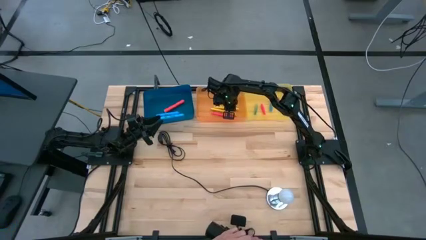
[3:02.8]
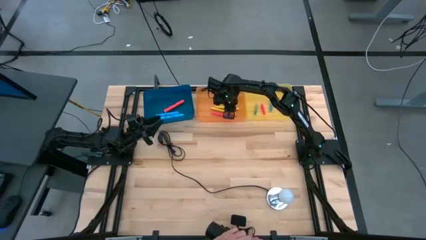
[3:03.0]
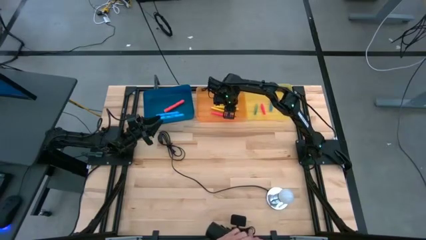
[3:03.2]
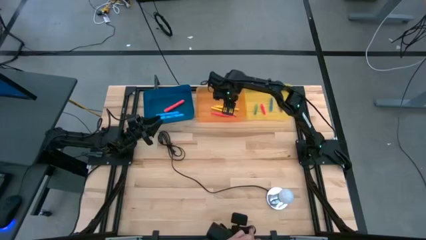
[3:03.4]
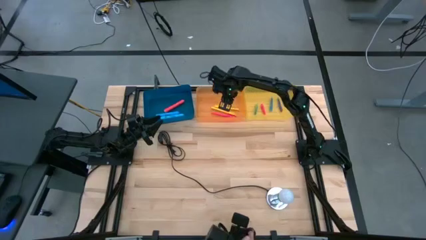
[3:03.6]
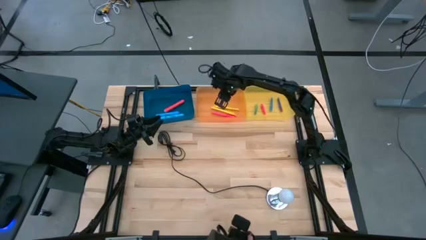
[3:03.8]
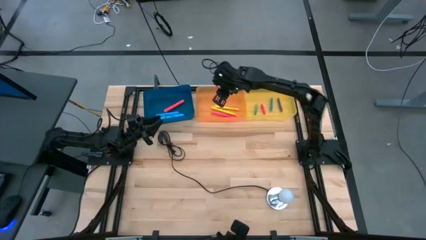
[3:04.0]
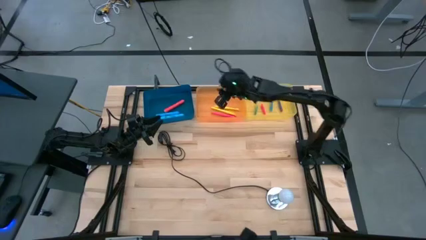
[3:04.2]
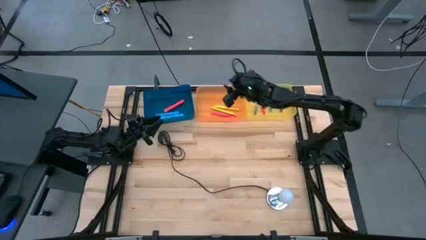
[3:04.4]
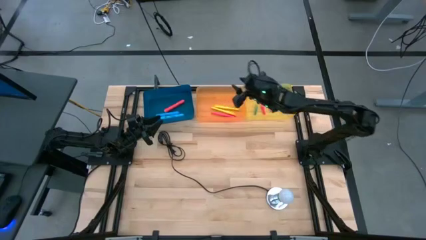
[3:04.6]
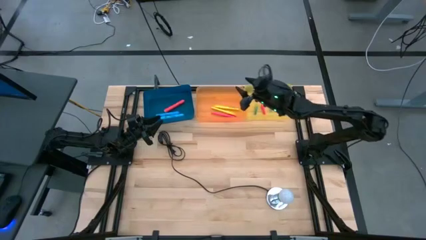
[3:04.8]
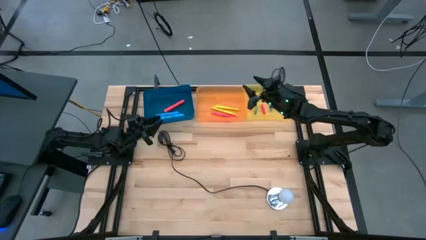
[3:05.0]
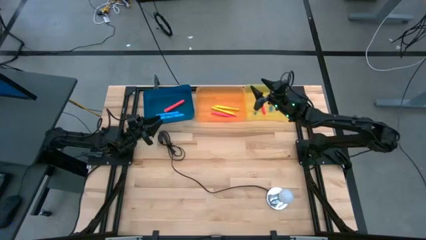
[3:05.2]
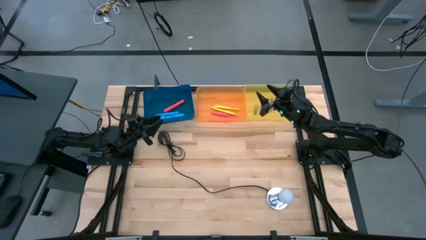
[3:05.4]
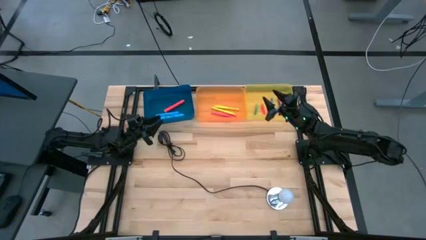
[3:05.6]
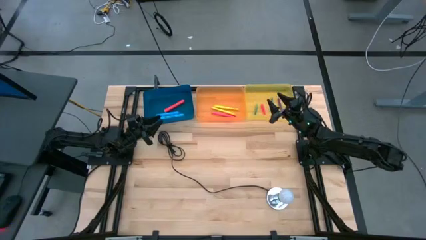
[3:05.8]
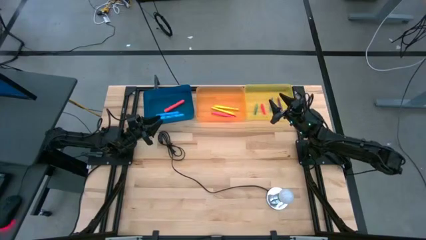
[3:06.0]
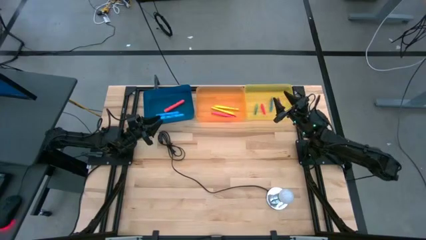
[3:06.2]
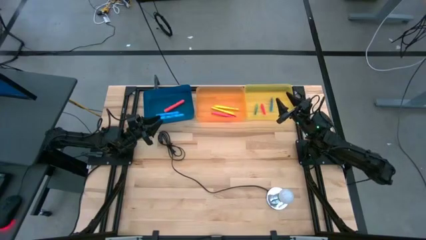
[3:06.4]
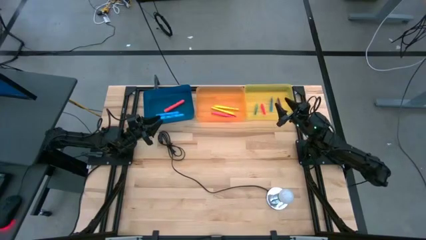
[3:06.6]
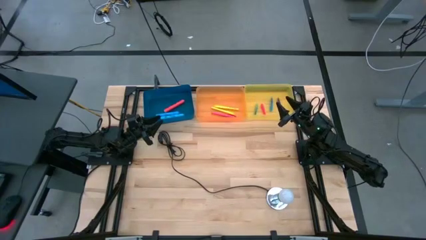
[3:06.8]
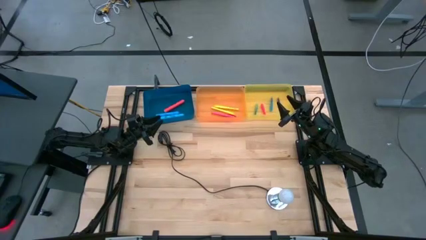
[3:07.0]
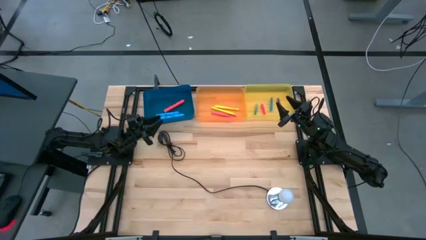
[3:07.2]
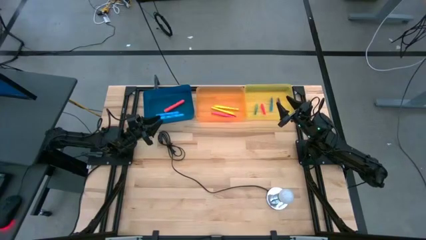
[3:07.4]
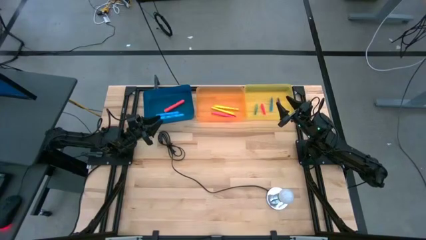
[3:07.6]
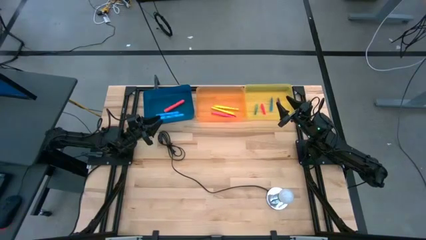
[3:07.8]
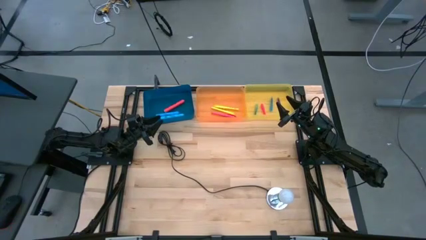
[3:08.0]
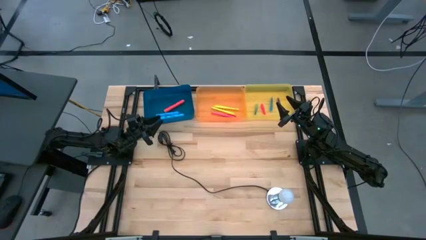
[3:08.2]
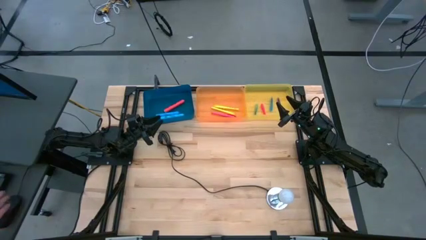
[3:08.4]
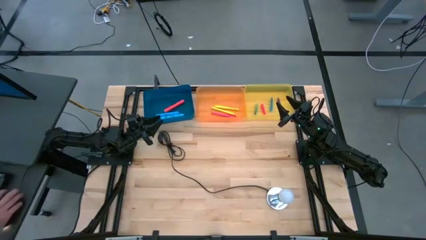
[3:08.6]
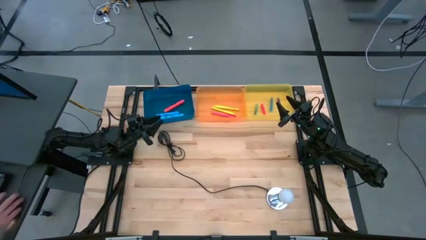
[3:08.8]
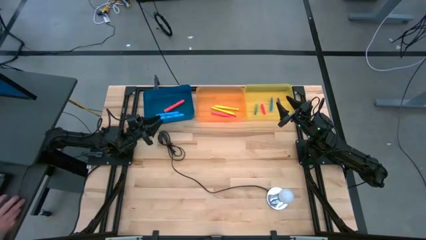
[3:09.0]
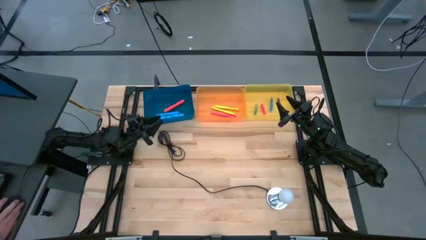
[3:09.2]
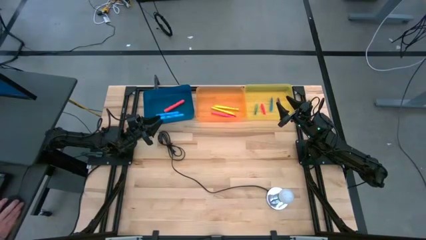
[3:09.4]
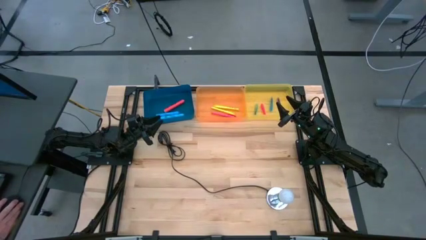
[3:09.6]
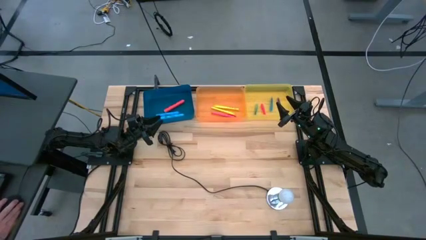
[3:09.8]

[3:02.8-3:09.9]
Task: Pick & Place Markers
Return to Home Position

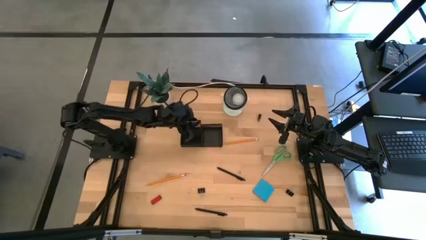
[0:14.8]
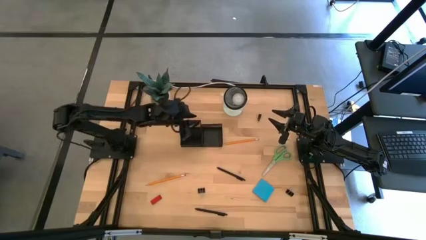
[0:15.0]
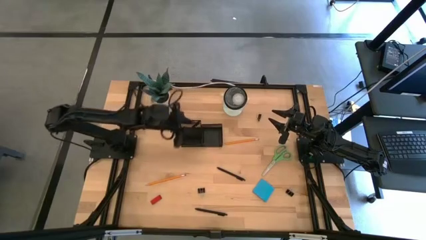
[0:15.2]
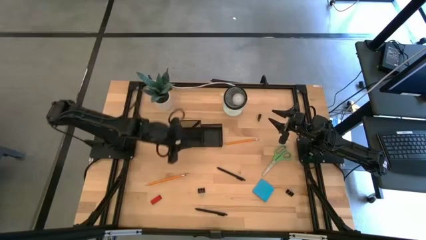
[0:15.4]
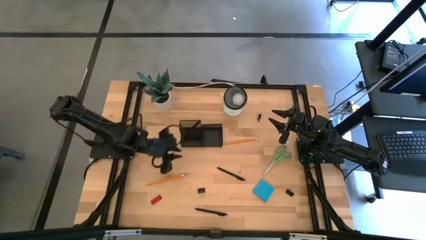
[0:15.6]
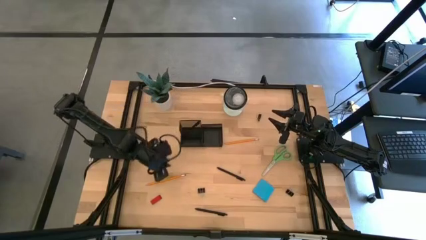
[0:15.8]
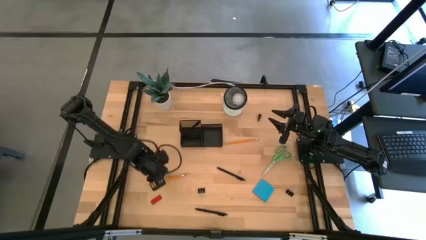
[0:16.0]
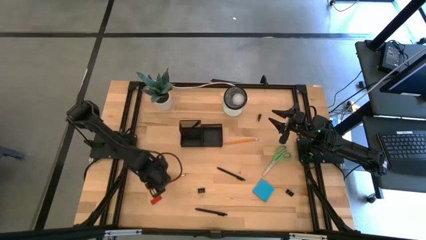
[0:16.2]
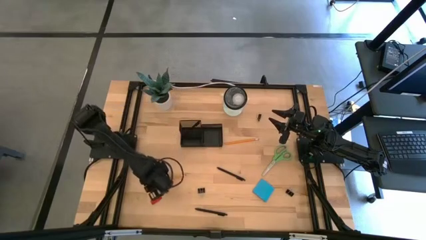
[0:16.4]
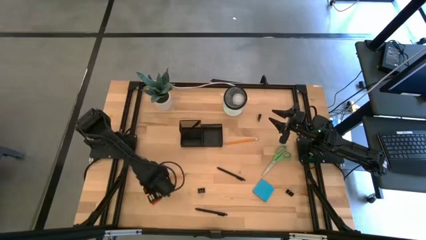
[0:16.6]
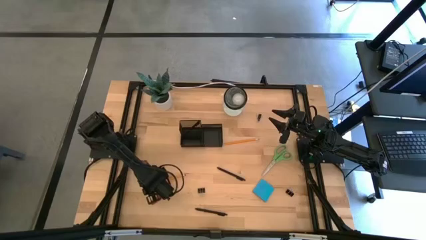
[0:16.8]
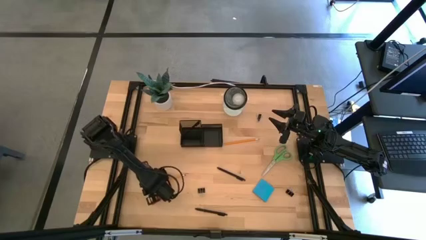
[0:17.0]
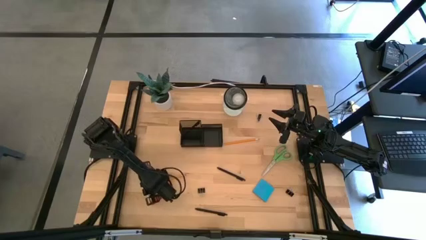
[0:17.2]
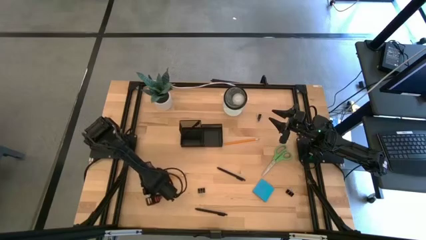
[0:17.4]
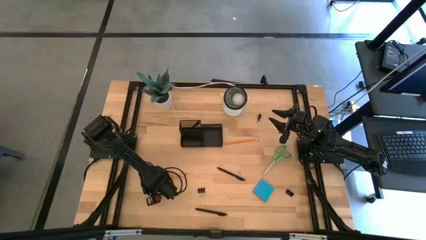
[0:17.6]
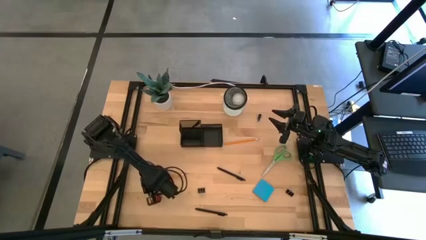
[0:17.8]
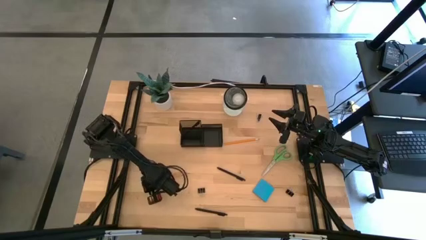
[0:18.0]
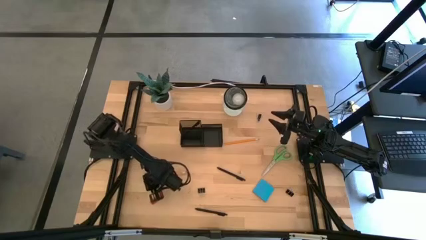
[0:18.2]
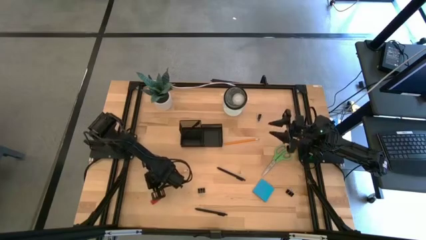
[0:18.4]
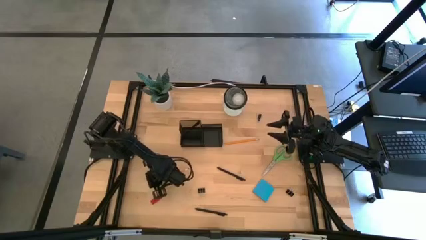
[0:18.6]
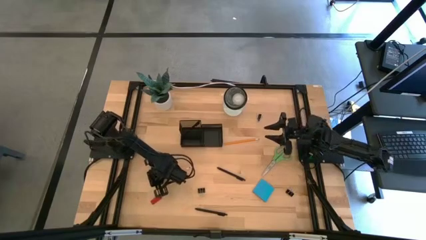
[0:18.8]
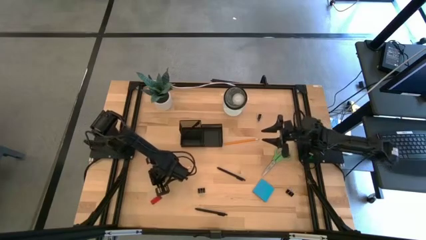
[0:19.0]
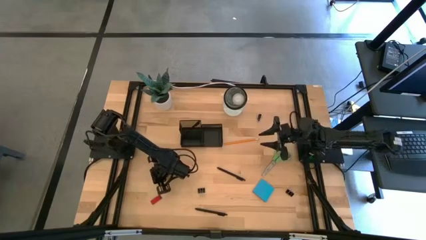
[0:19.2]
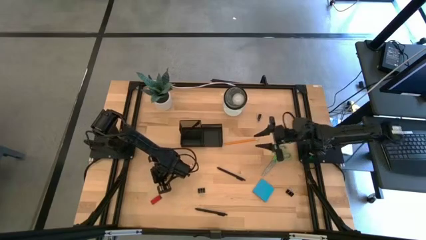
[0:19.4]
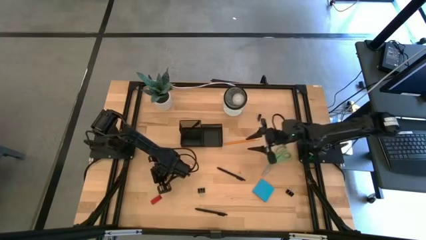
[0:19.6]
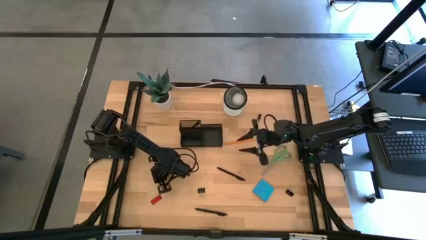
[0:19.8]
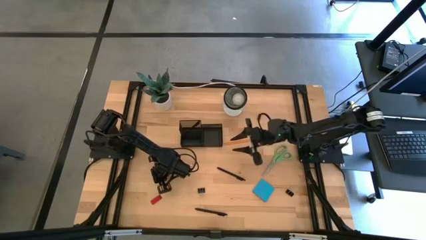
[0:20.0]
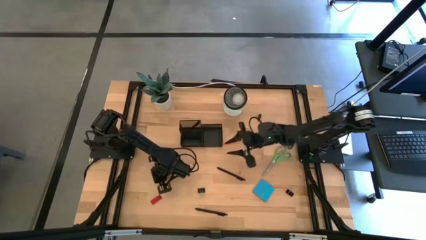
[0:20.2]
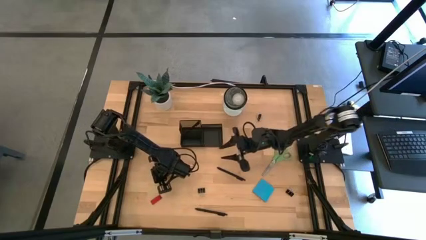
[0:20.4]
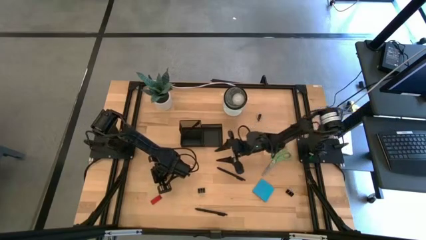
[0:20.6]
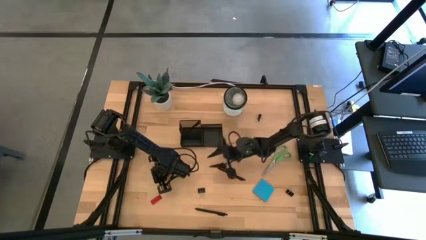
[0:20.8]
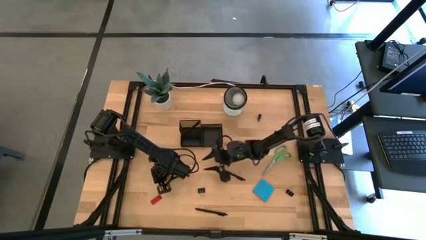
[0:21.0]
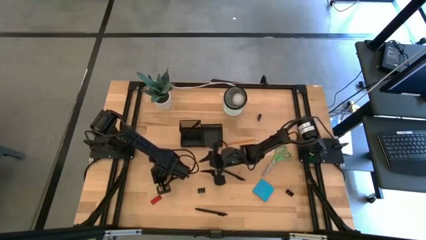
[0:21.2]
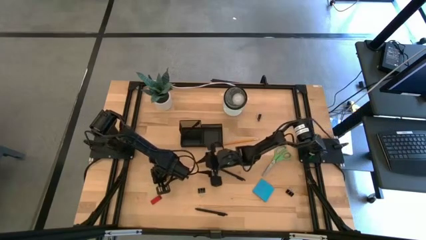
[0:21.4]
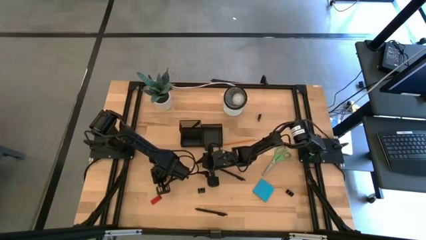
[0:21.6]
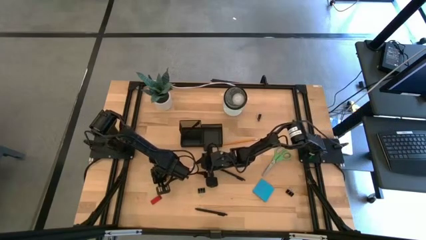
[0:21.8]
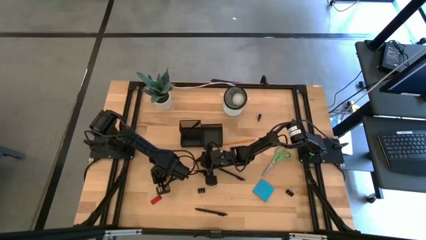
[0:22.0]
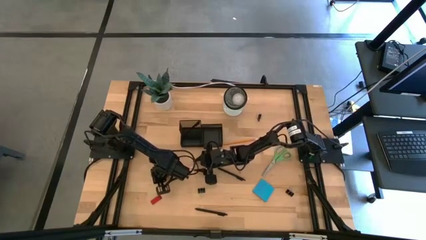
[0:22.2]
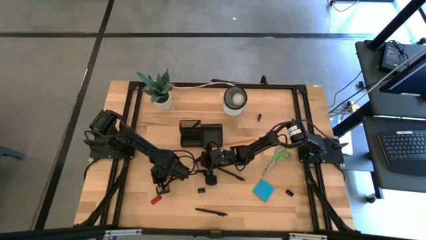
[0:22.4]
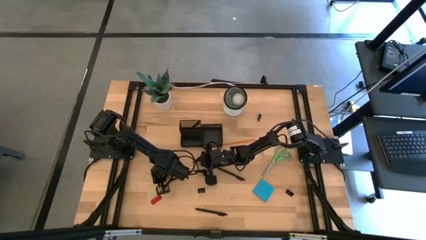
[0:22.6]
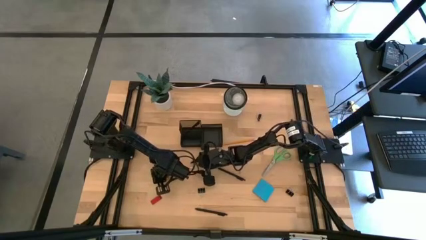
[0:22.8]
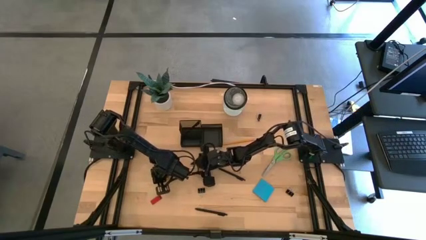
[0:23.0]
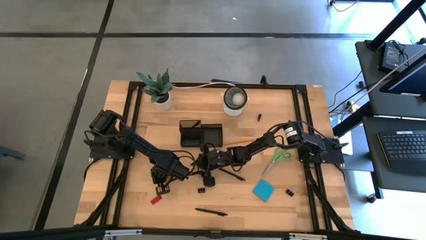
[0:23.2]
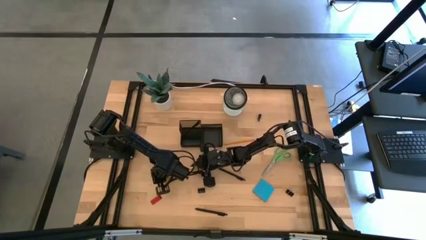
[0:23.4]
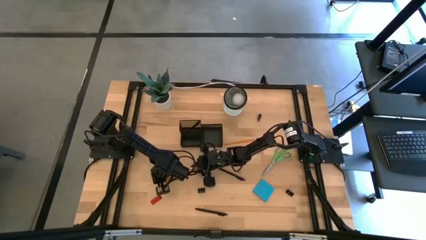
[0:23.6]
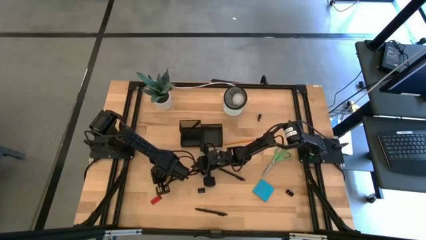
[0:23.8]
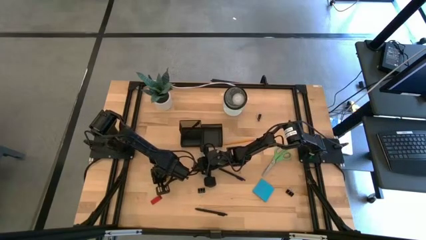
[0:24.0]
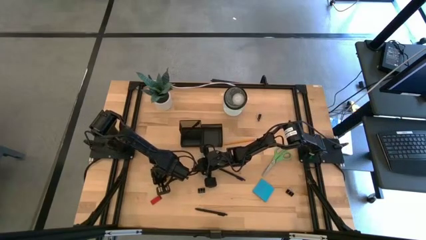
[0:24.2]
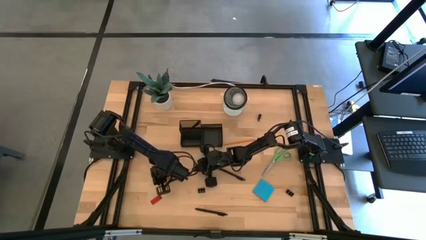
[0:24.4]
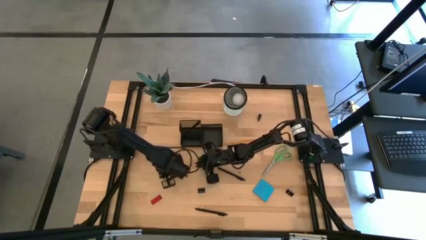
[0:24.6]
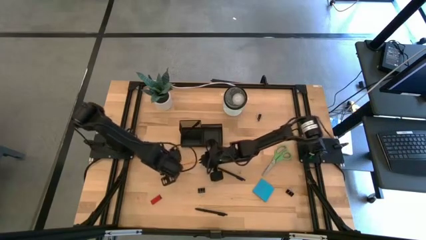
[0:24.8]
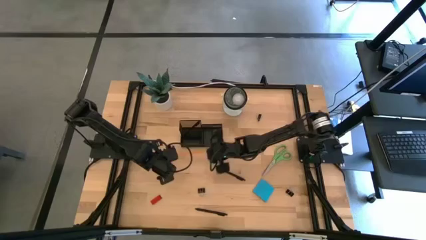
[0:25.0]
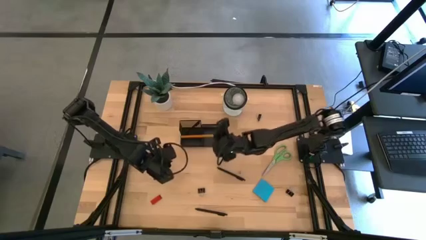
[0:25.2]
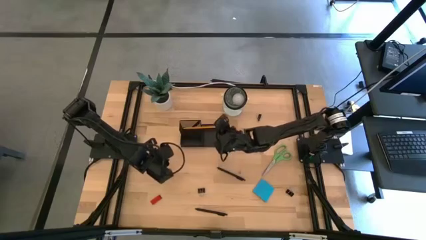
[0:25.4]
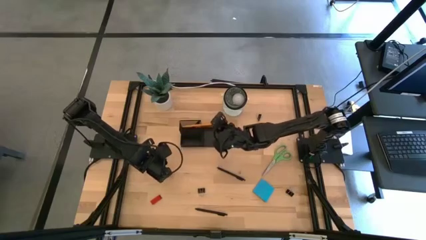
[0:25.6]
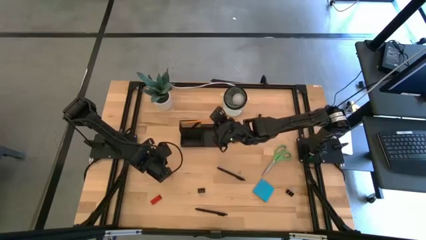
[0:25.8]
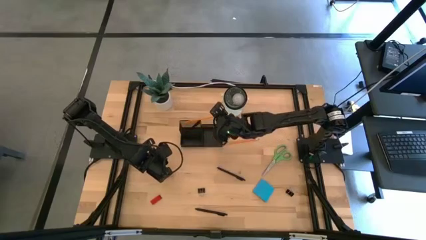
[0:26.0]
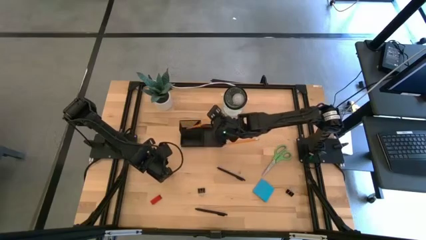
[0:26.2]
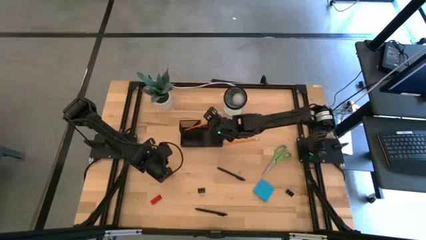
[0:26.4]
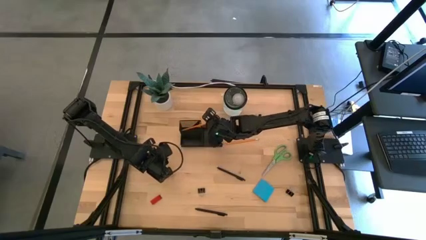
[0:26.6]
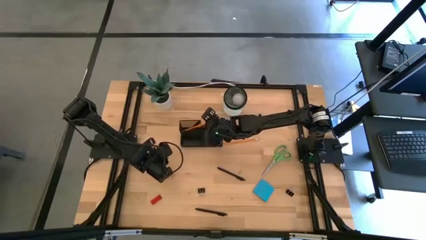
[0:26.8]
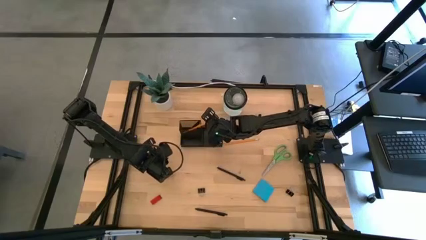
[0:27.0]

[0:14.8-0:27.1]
Task: Pick and place office supplies into organizer
Put the left yellow pencil in the desk organizer
